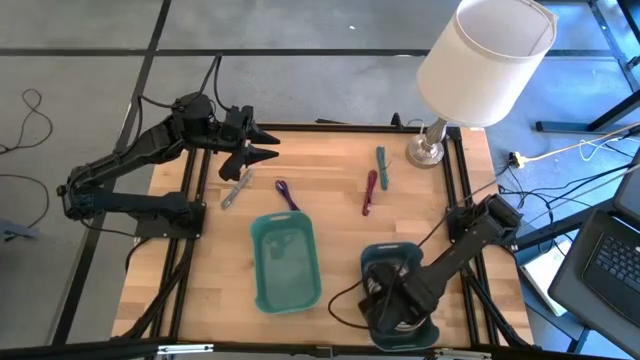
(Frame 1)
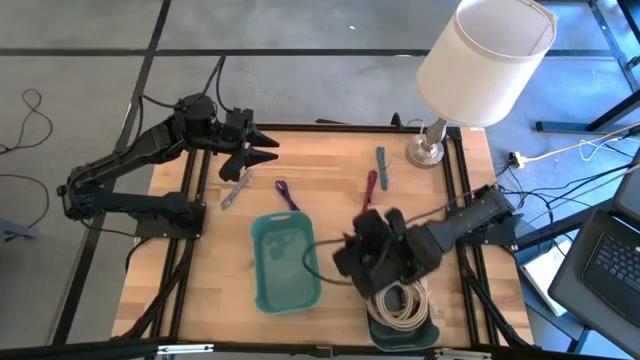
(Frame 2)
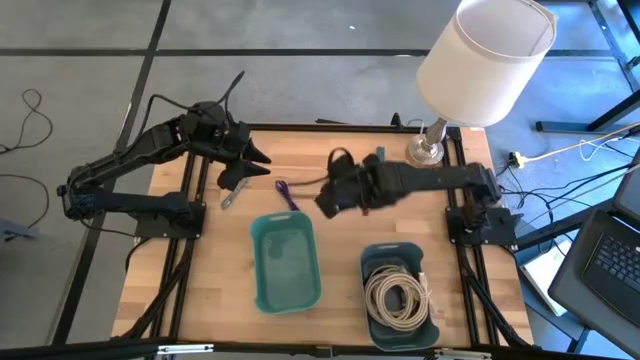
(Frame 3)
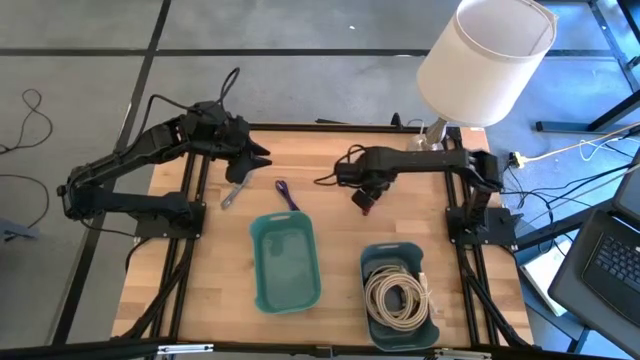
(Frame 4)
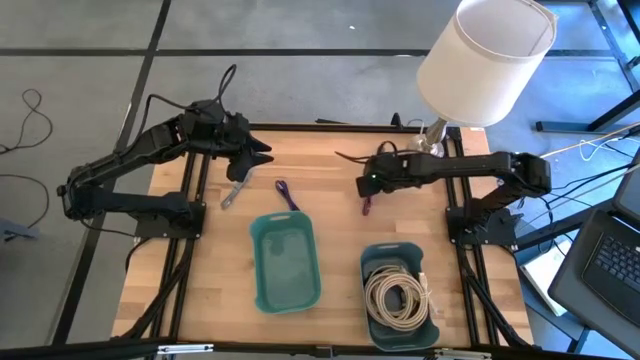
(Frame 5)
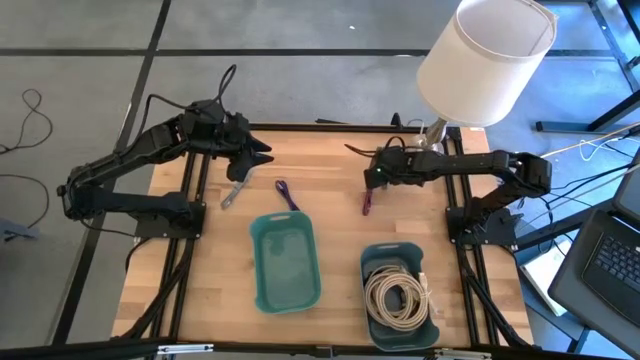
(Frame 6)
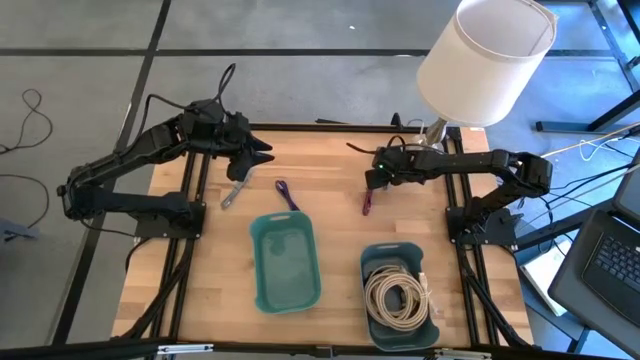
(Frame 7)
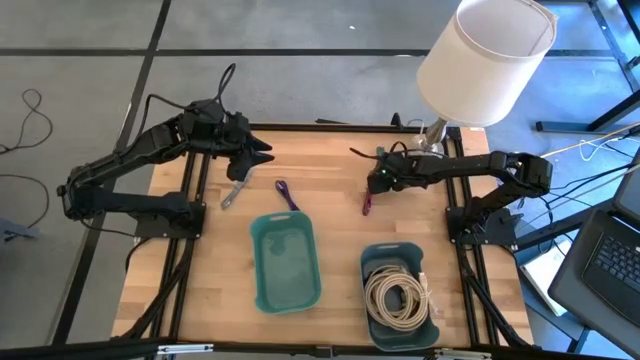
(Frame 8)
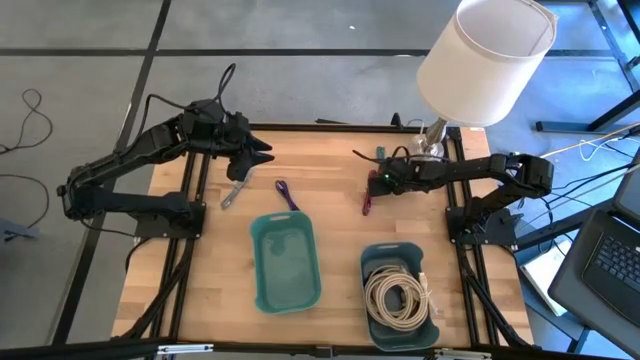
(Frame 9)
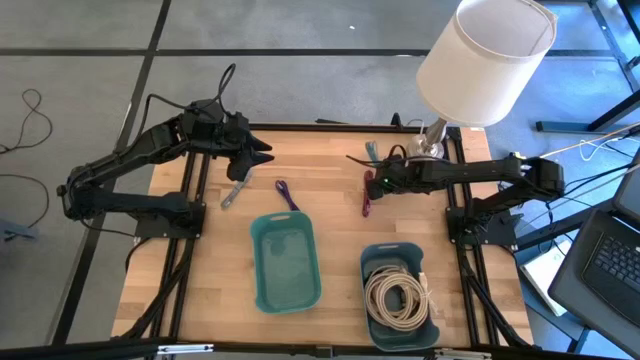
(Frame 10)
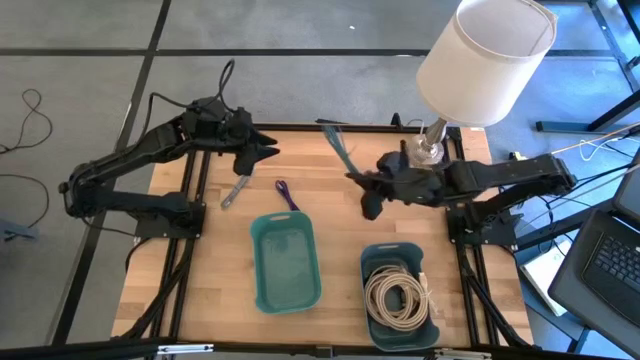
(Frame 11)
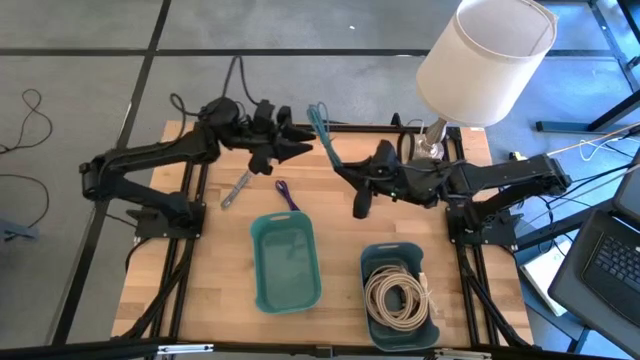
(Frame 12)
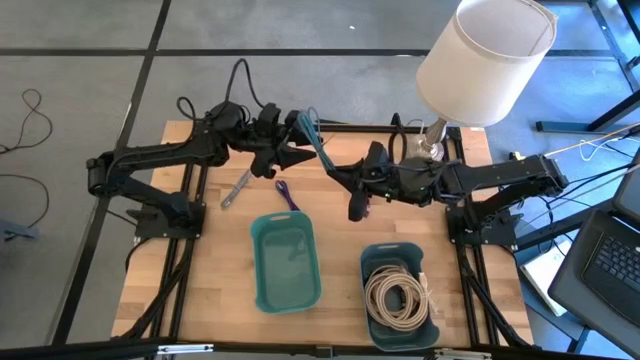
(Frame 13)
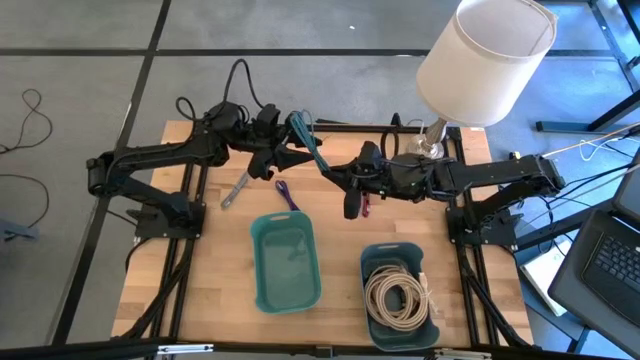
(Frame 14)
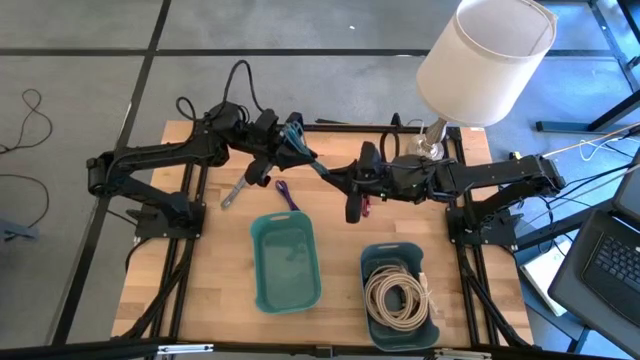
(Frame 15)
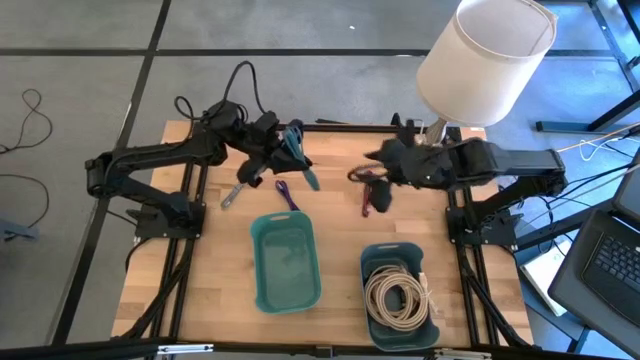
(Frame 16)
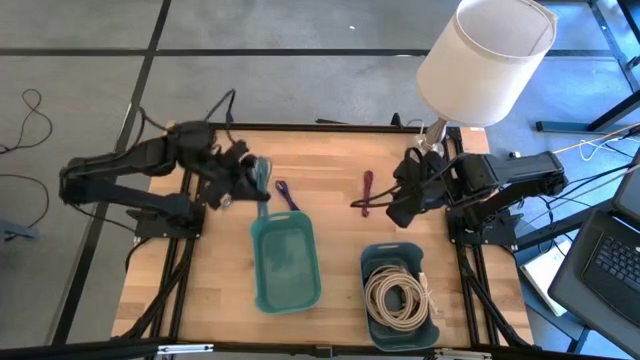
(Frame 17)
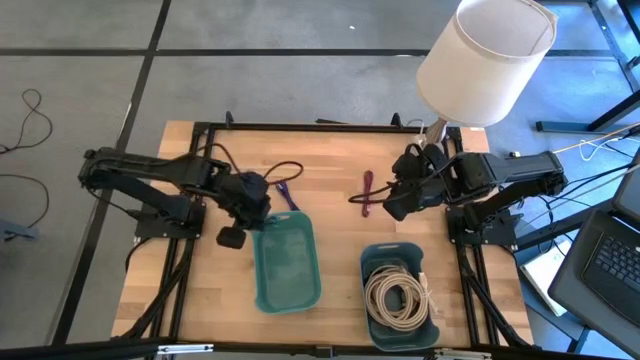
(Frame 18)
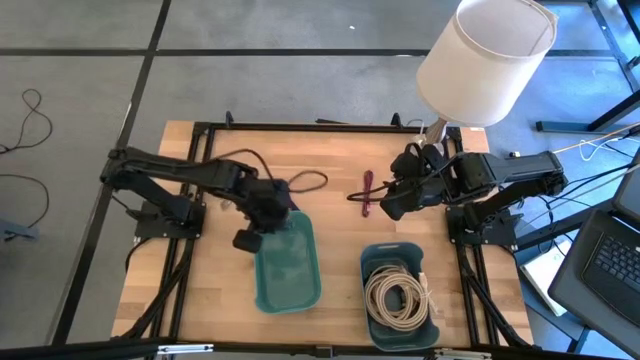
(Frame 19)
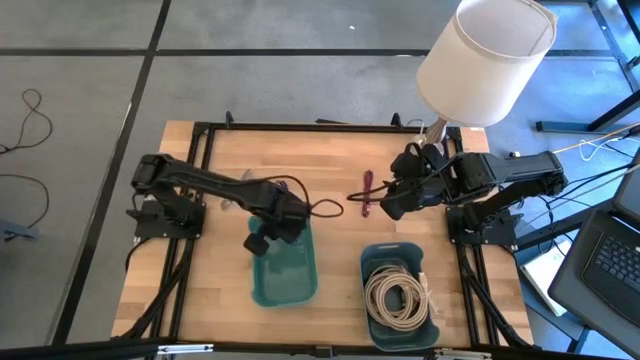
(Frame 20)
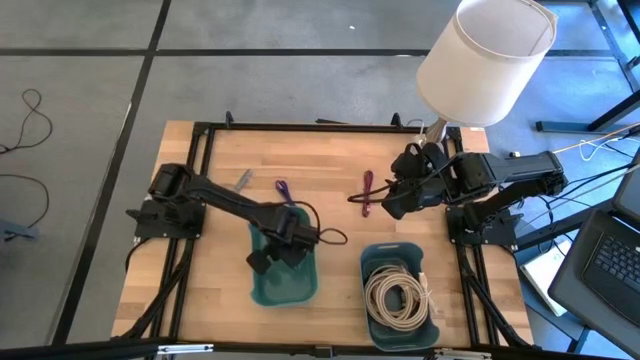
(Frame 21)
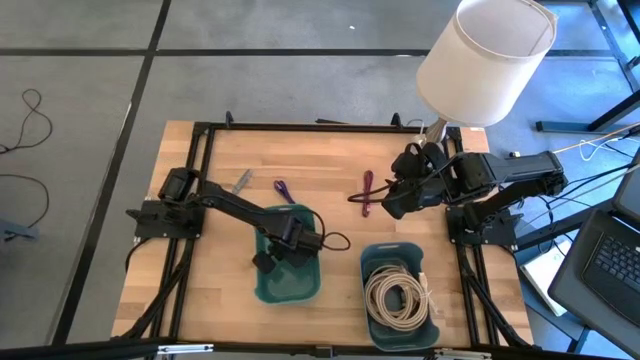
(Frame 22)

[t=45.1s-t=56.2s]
Task: Pick and place USB-C Cables
Put the black and blue USB cable into the green bin

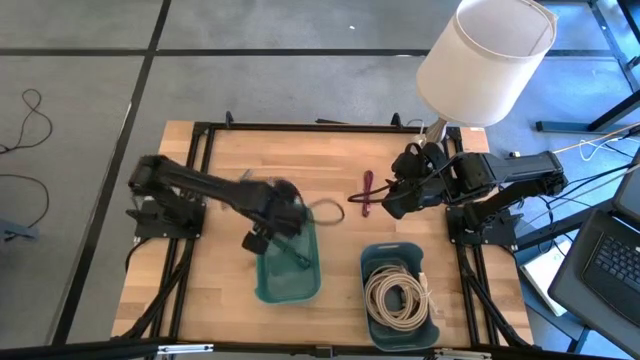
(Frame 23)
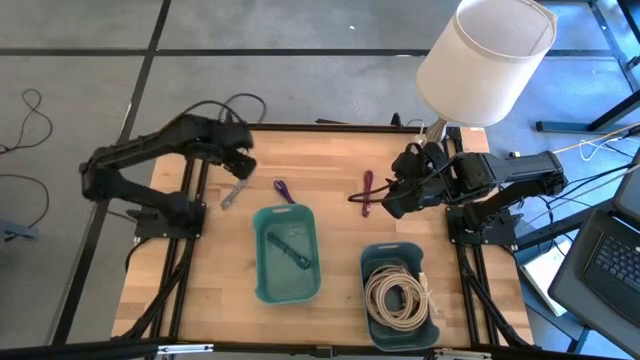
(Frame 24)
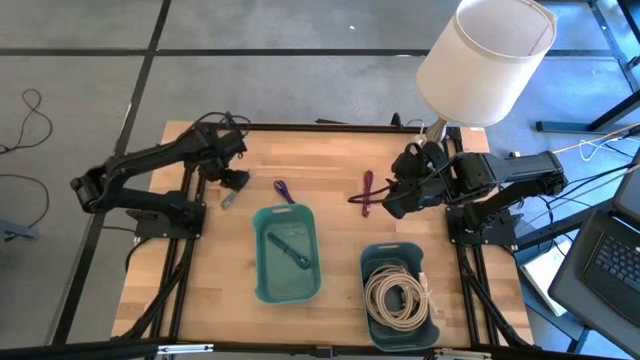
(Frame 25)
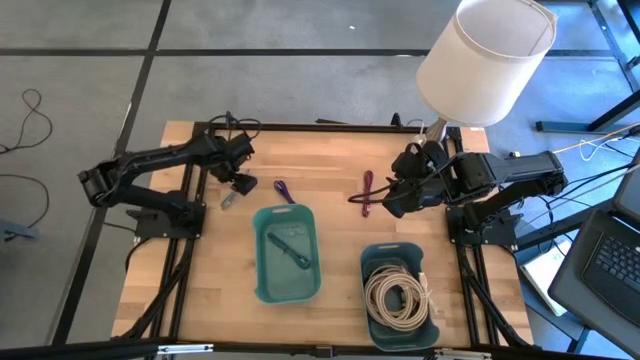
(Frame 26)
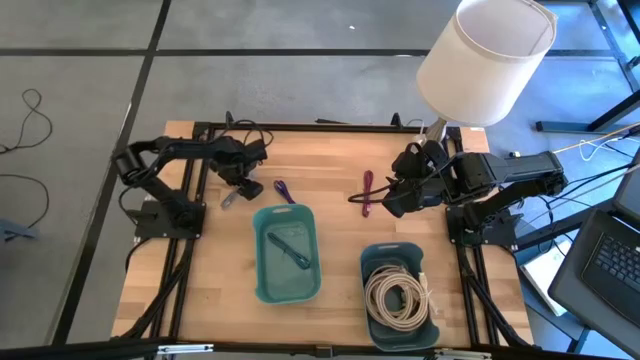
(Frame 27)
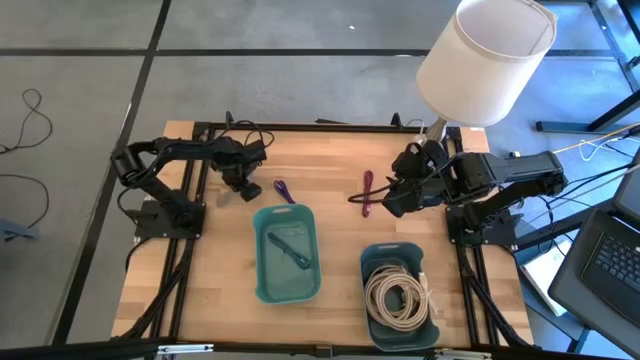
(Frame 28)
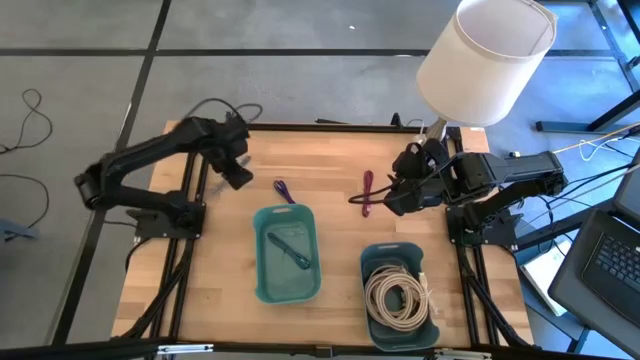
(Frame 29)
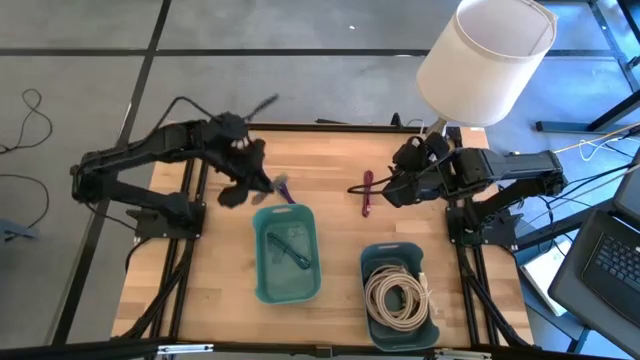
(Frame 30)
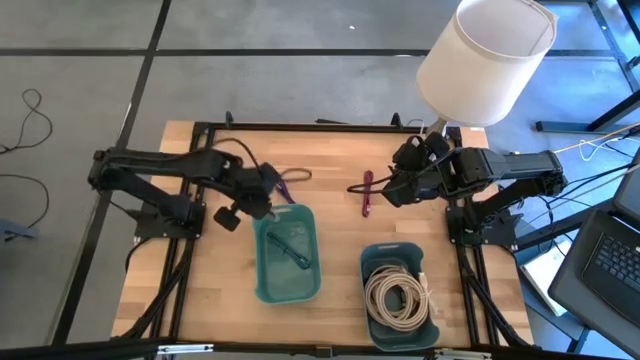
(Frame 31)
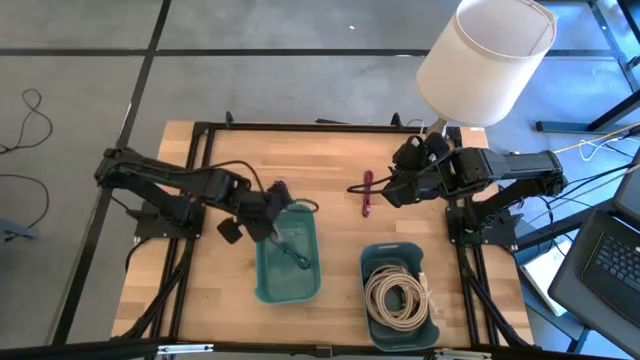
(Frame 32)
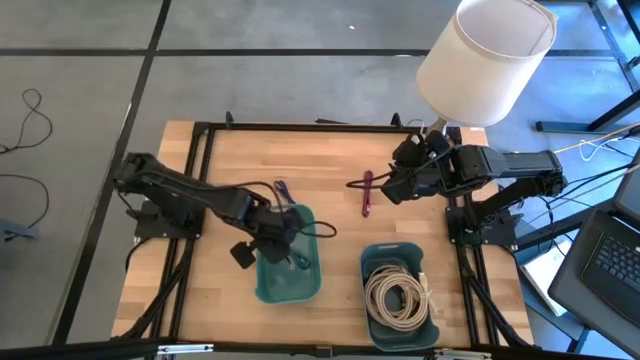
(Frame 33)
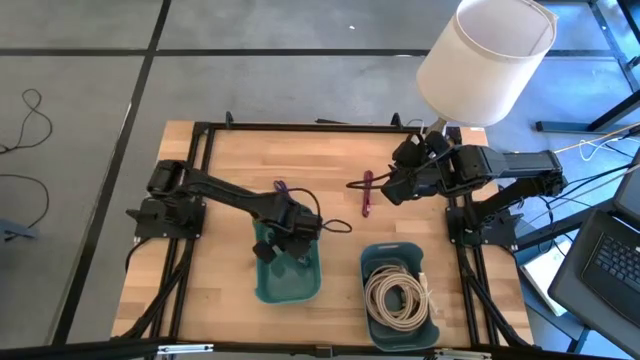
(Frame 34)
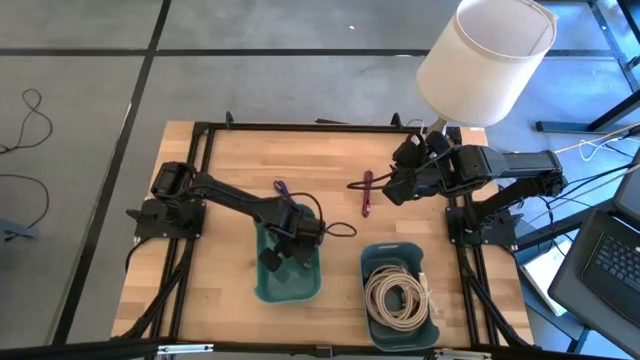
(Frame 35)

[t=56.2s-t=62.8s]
Put the black and white USB cable into the green bin

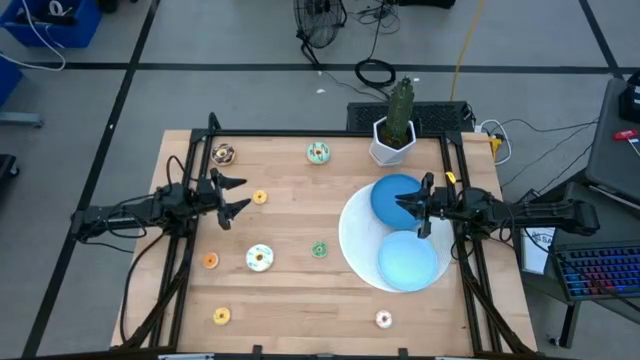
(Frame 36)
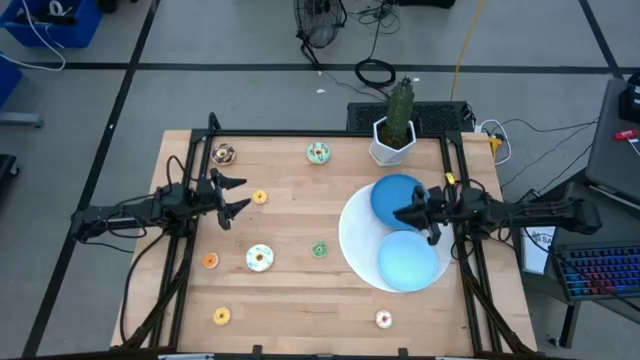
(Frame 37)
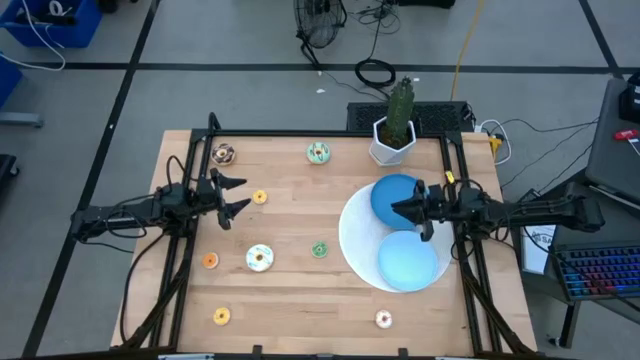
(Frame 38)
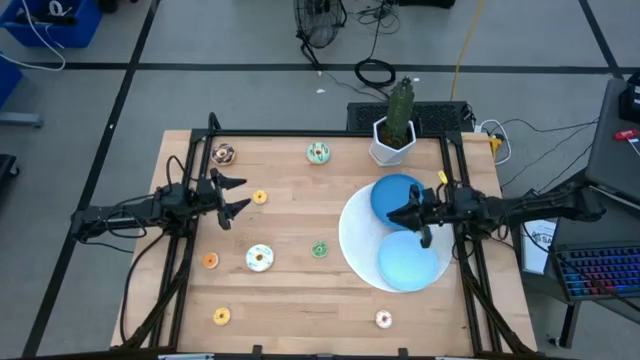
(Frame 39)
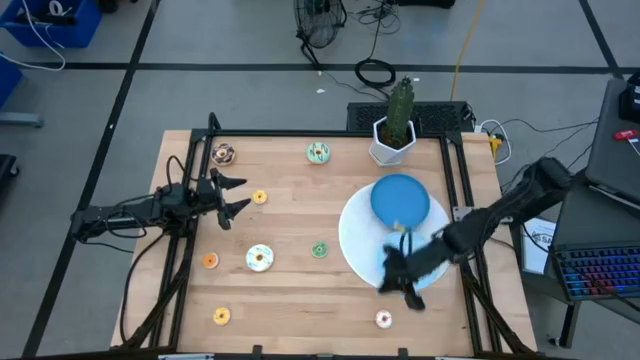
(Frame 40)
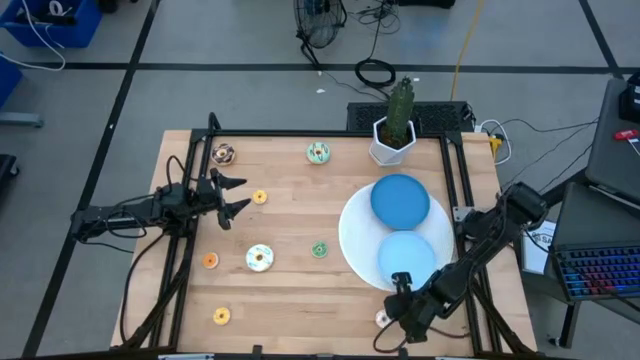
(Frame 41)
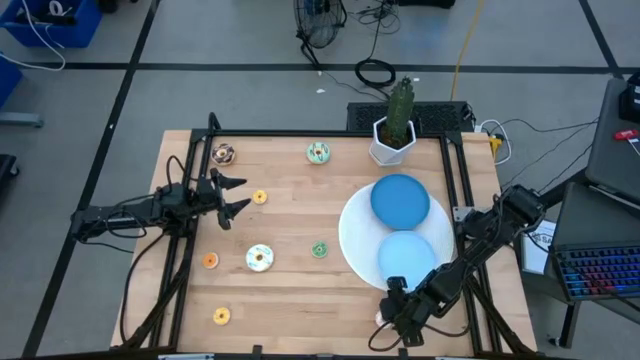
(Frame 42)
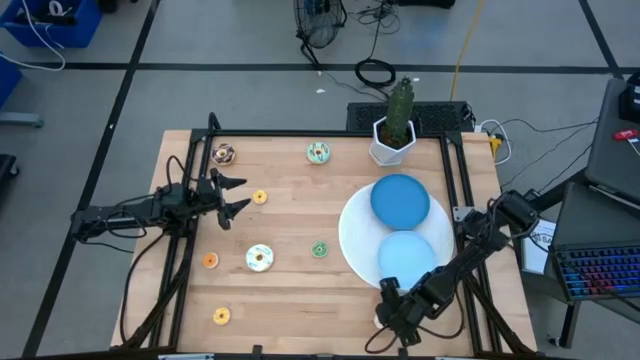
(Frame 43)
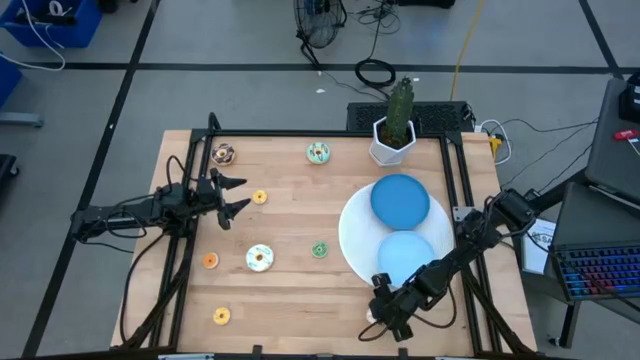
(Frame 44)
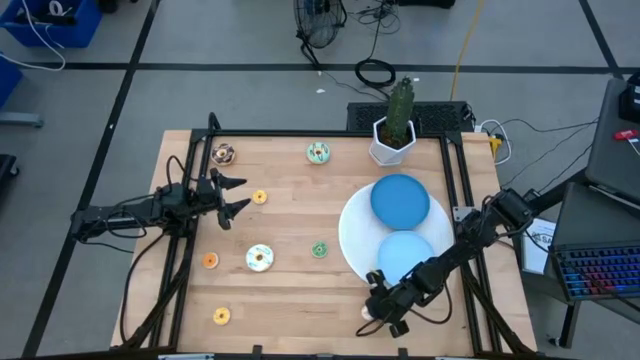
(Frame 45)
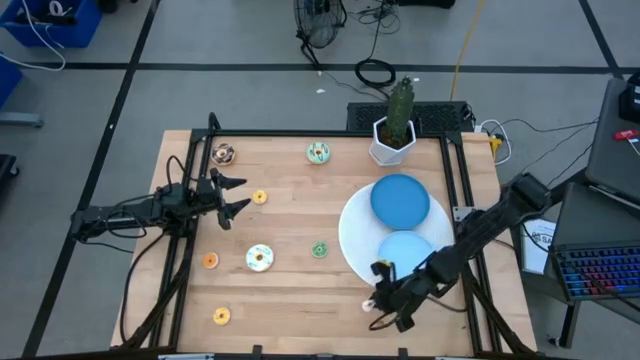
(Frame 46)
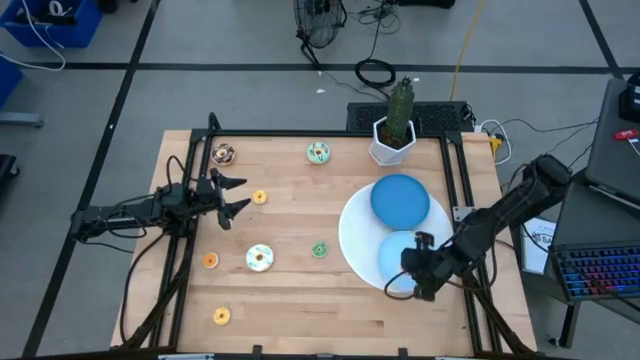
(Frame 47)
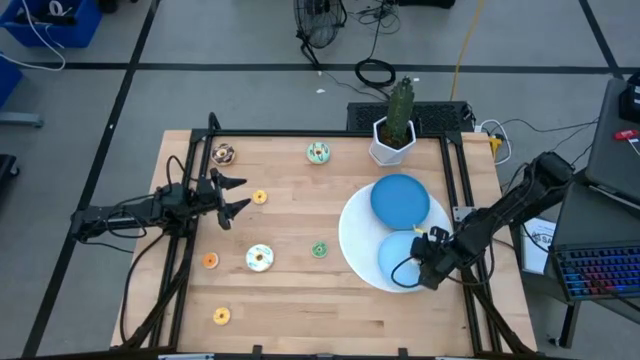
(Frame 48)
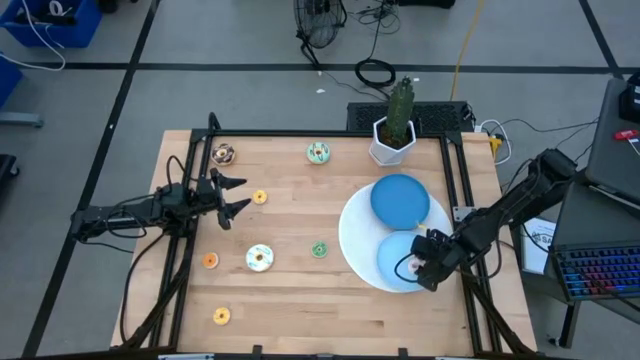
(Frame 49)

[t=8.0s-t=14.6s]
Task: Pick & Place donuts
Put the small white donut on the light blue plate
